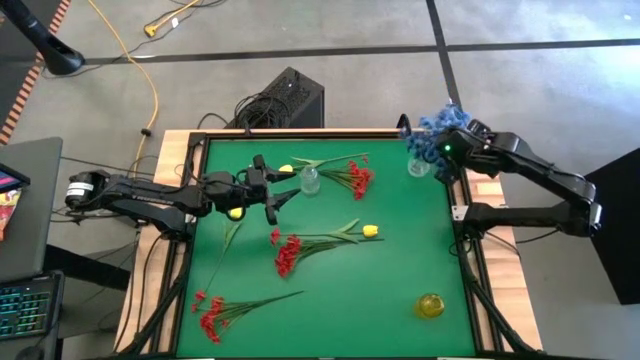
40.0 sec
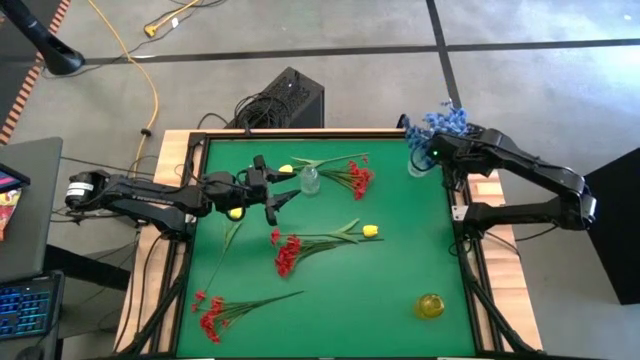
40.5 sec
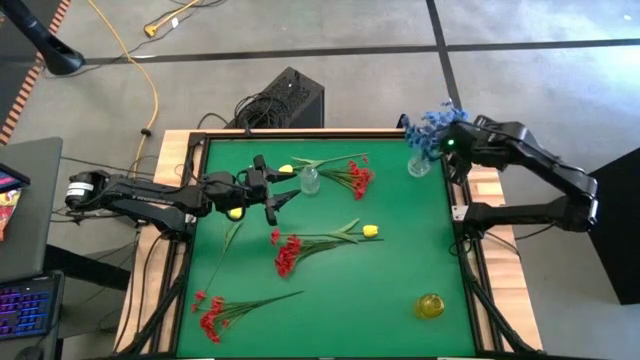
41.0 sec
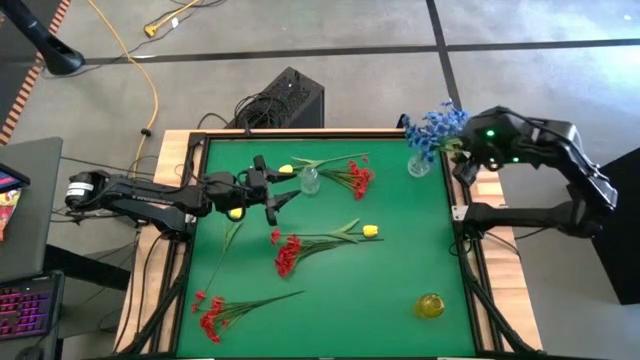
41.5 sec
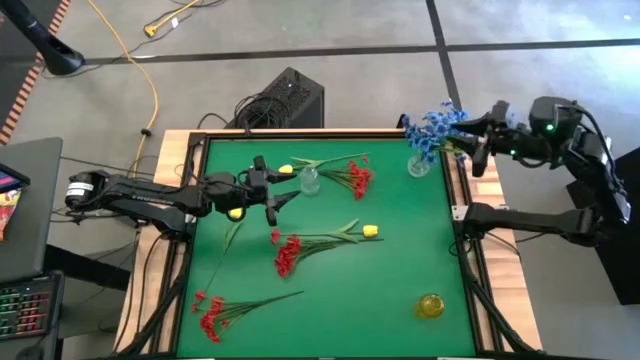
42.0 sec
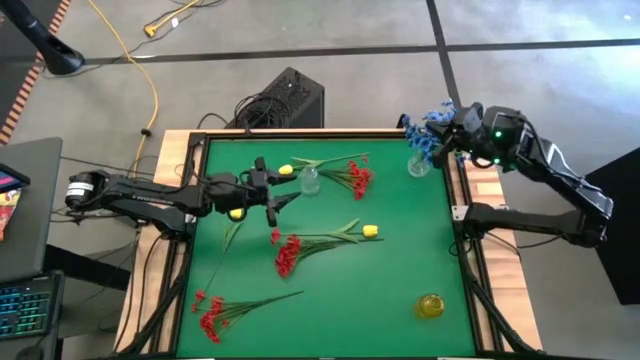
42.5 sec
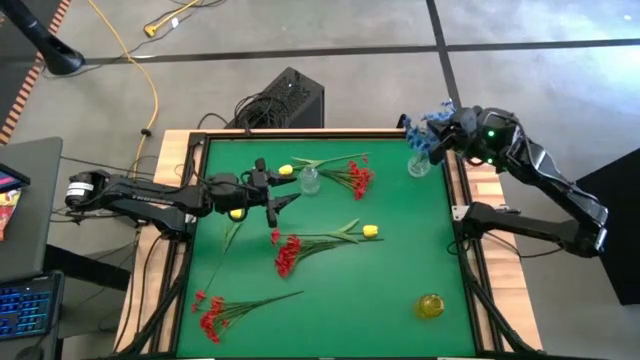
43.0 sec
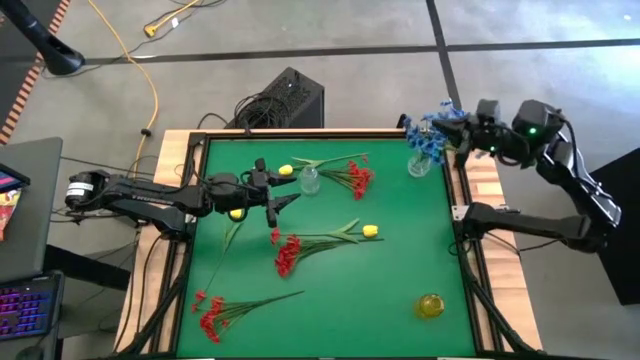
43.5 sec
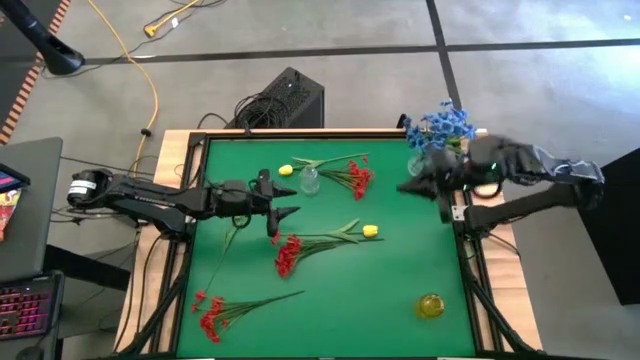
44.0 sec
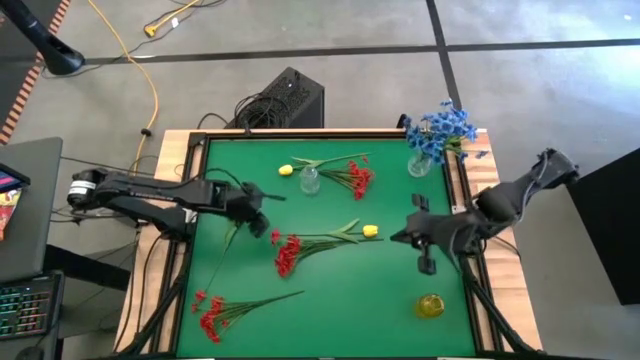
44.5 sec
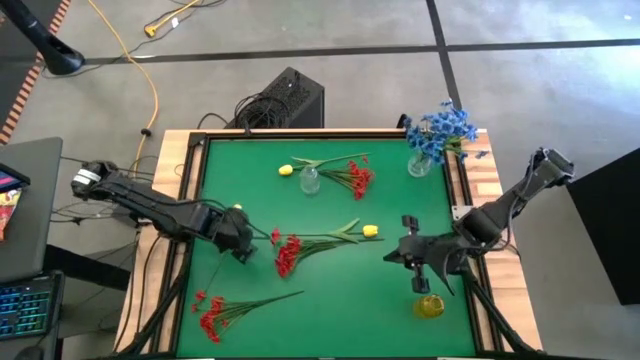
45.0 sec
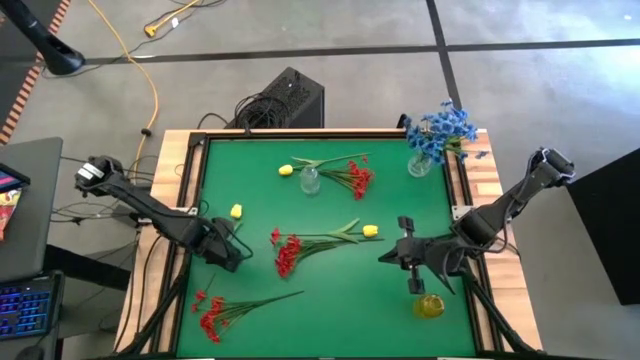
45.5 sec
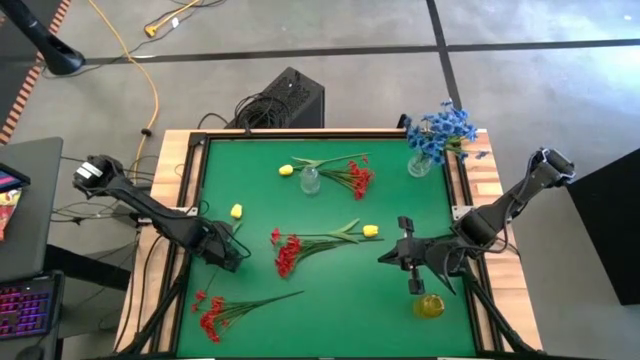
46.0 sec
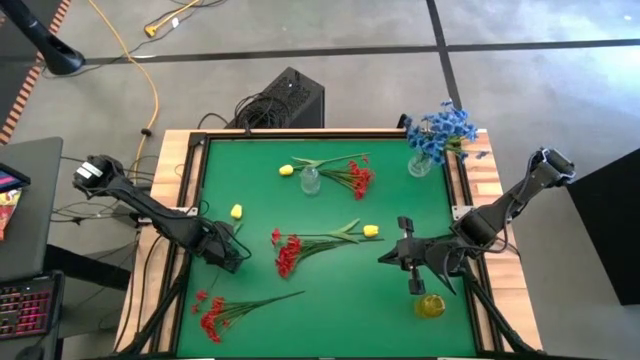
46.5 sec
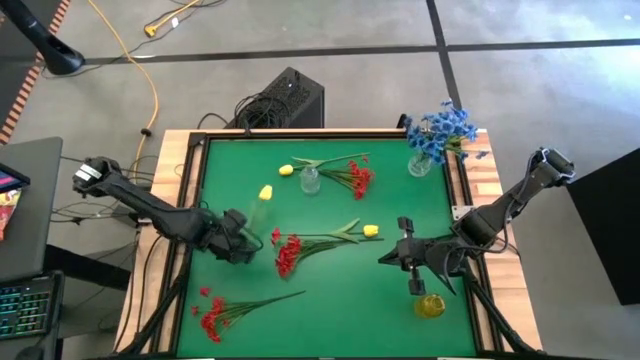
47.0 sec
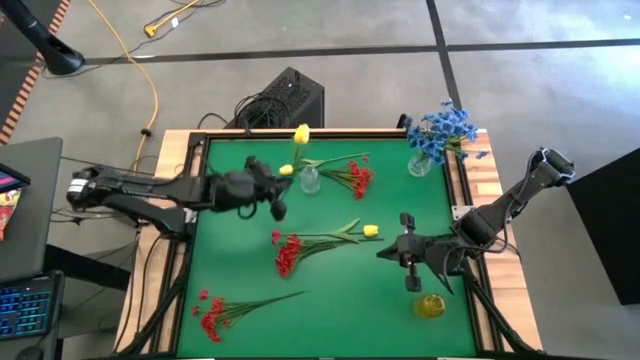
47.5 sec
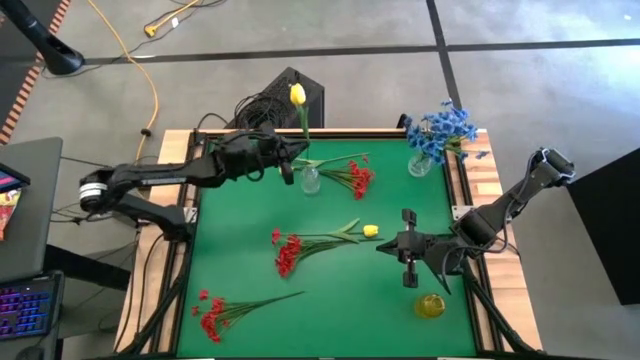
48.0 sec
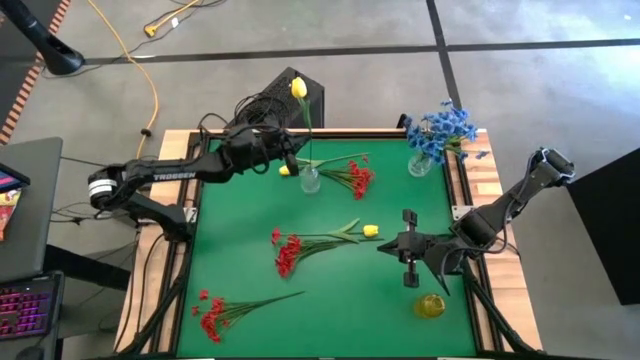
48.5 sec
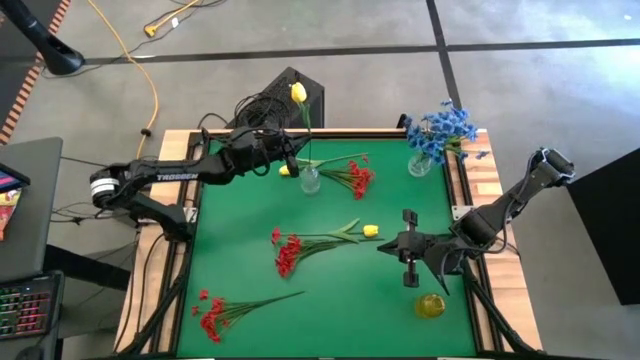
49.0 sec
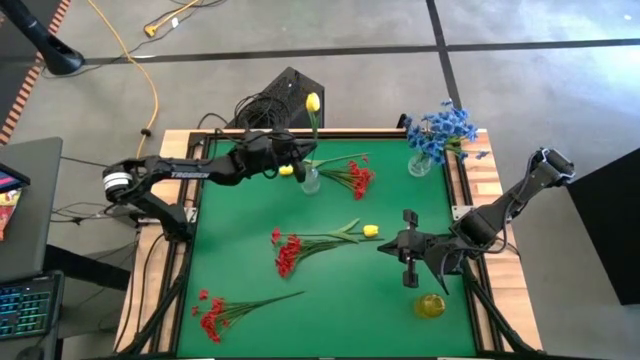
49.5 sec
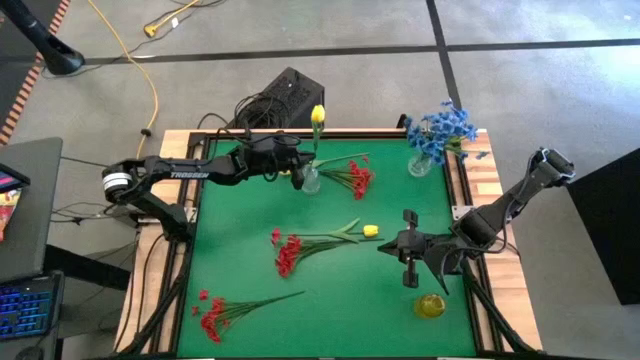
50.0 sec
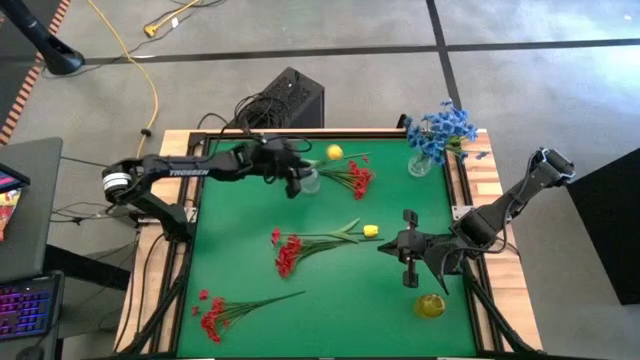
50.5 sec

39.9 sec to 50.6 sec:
Task: Sort flowers into vase by color
Put the bottom left yellow tulip into the left transparent vase

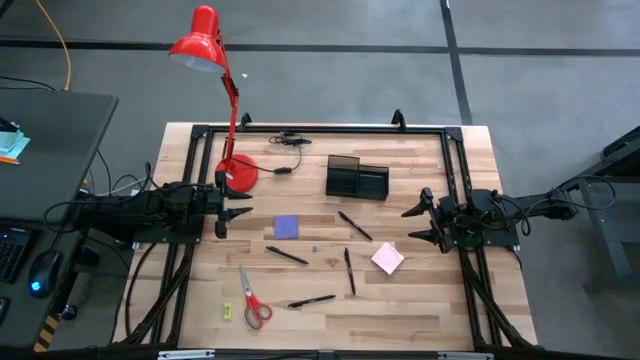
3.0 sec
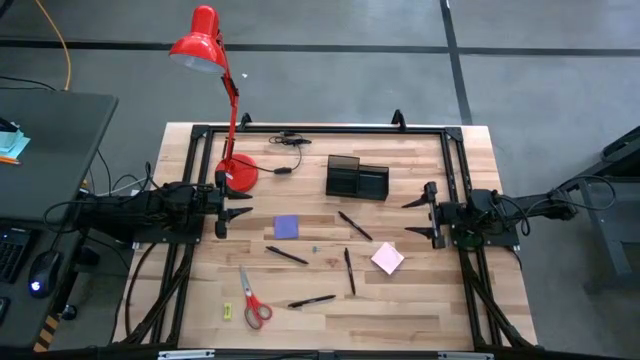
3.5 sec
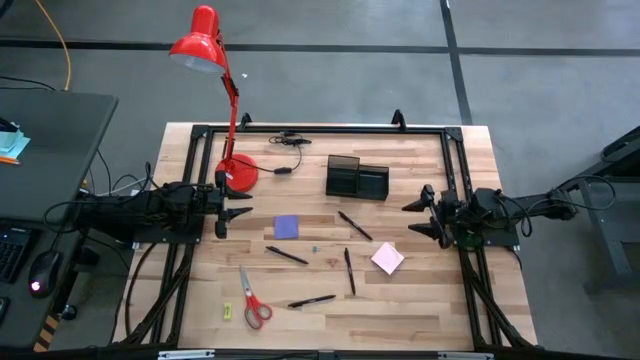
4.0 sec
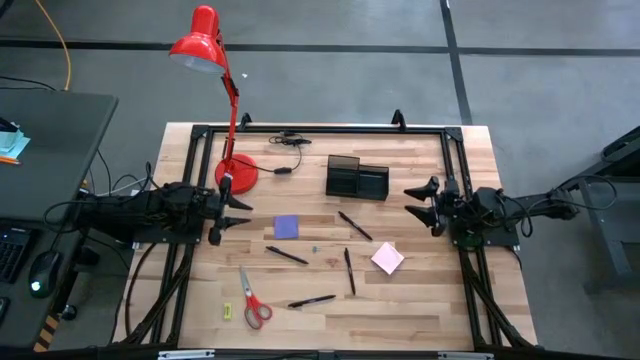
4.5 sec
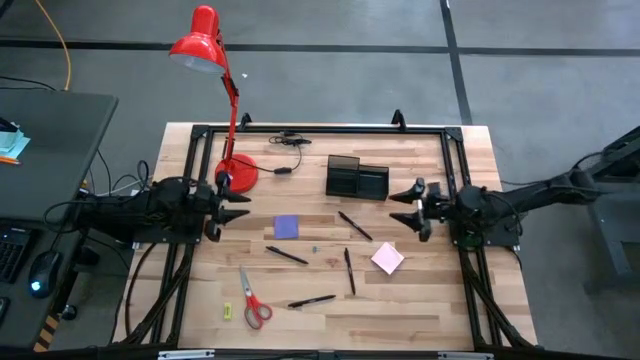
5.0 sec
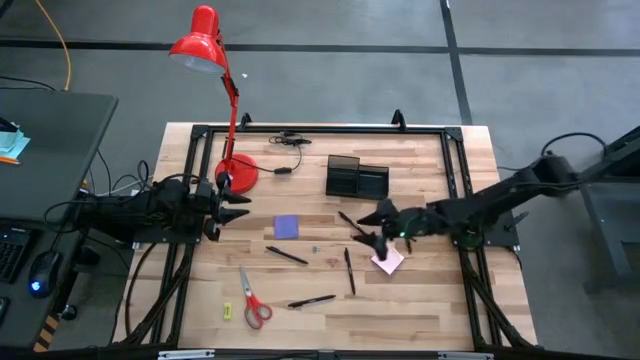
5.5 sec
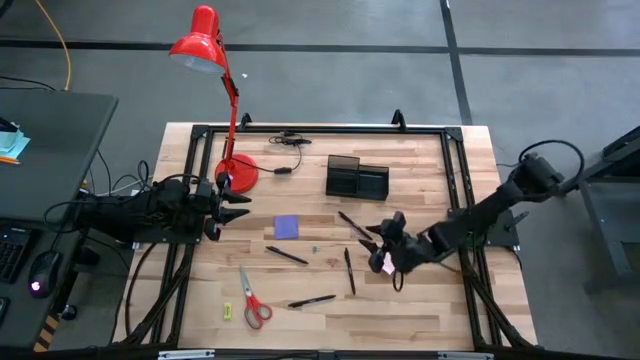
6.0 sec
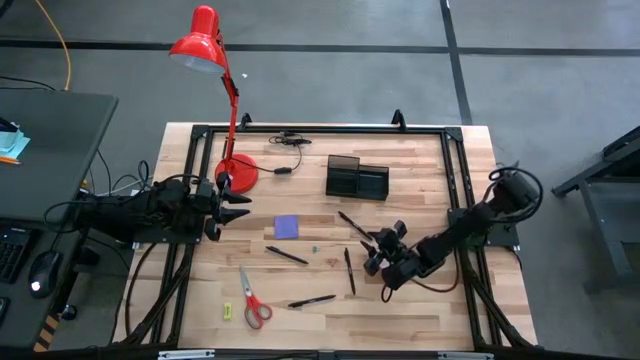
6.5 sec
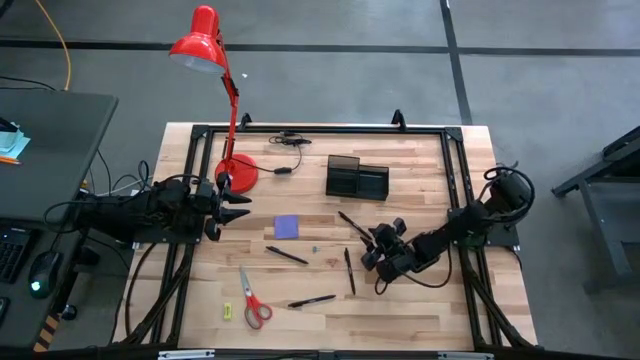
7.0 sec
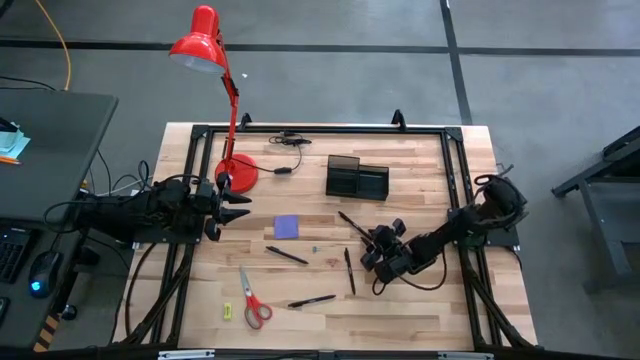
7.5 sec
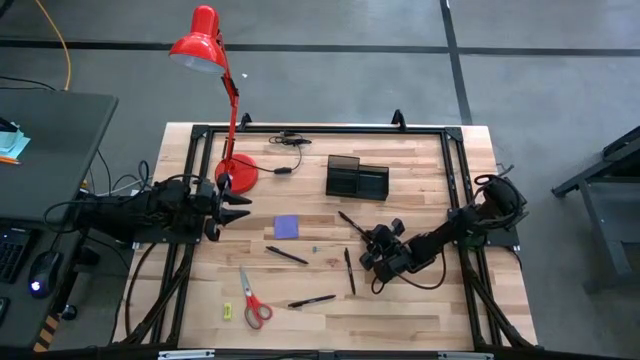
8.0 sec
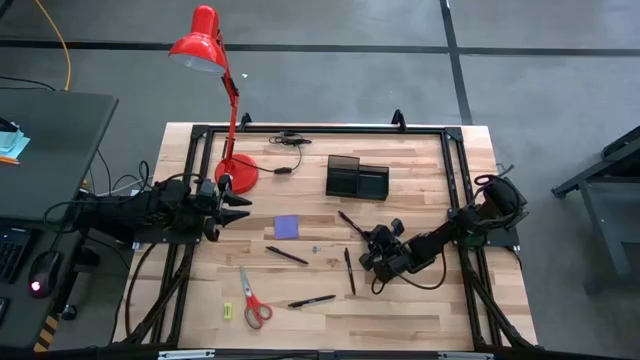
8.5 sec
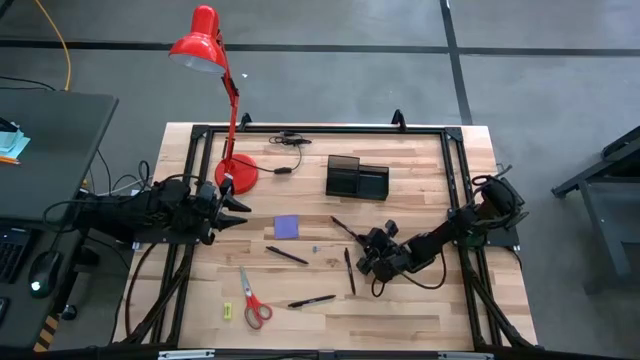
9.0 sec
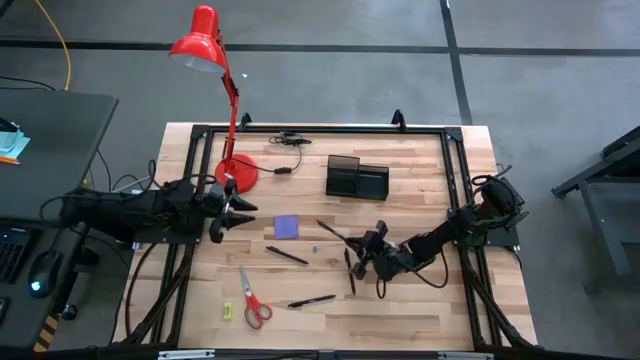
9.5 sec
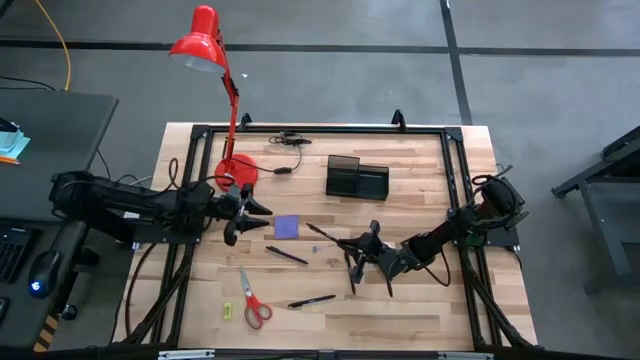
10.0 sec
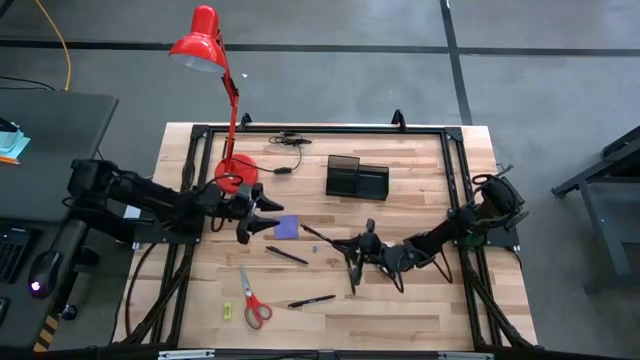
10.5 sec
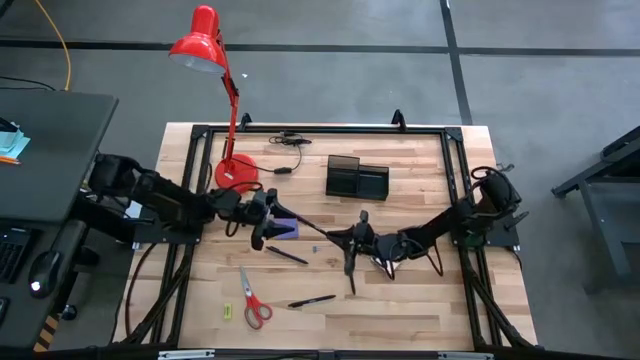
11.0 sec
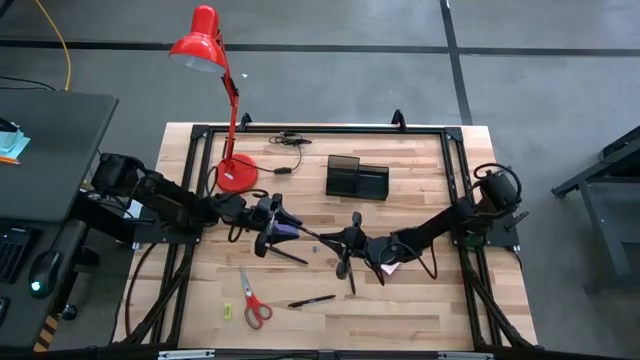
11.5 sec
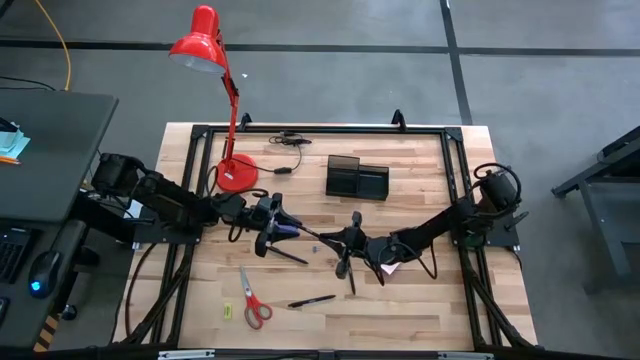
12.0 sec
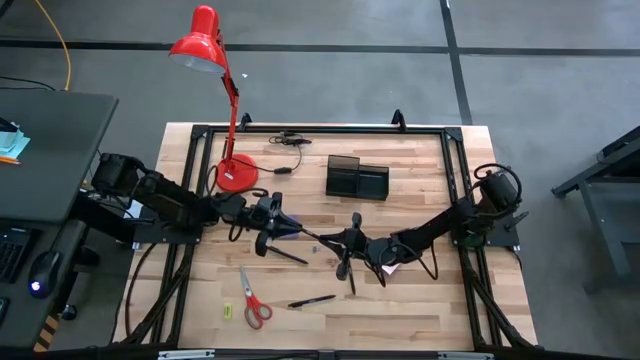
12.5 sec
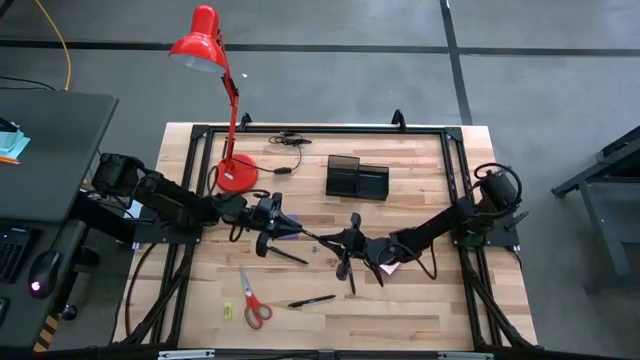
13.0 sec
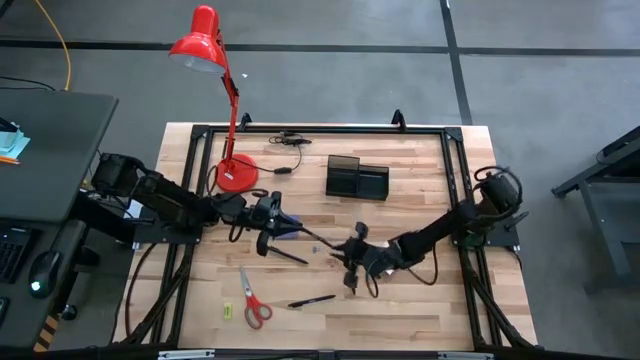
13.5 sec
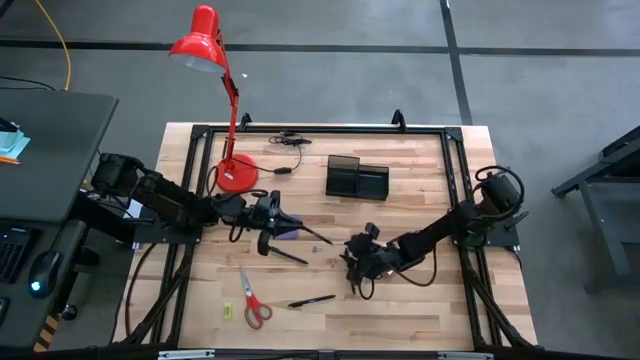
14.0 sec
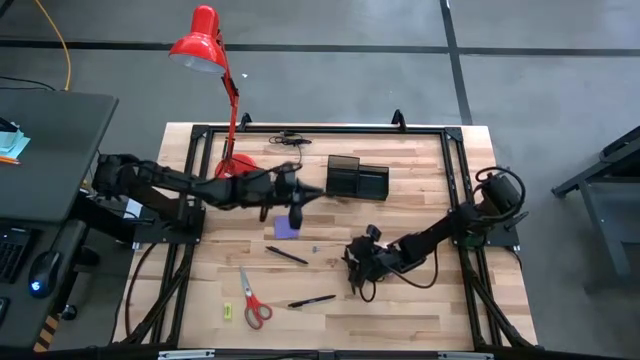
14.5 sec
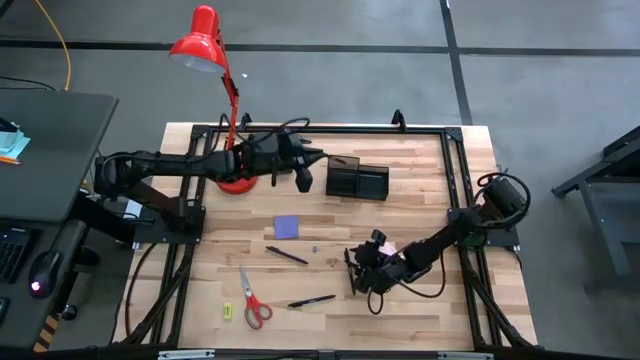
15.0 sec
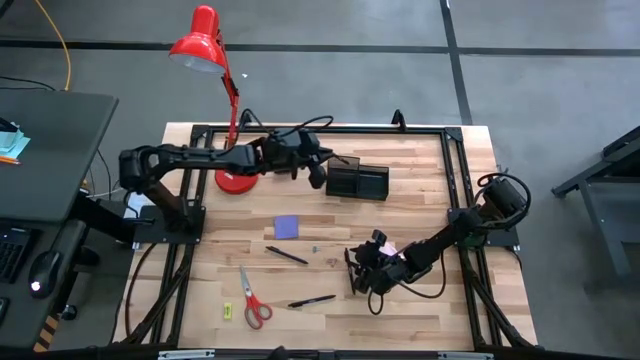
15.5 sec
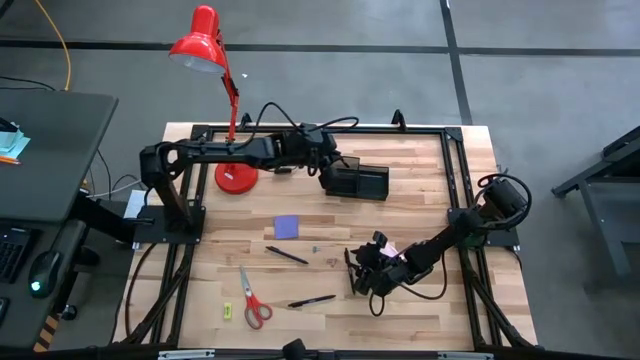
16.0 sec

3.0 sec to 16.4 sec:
Task: Pick and place office supplies into organizer
Put the black pen into the black desk organizer
